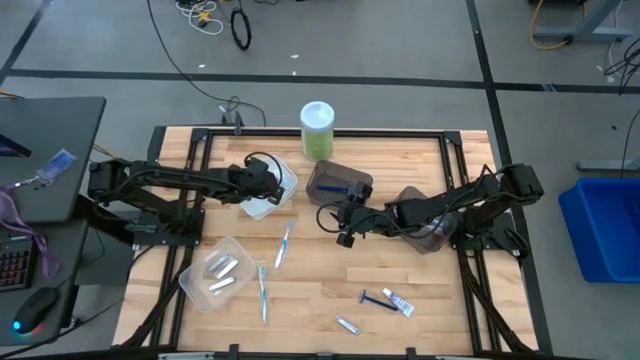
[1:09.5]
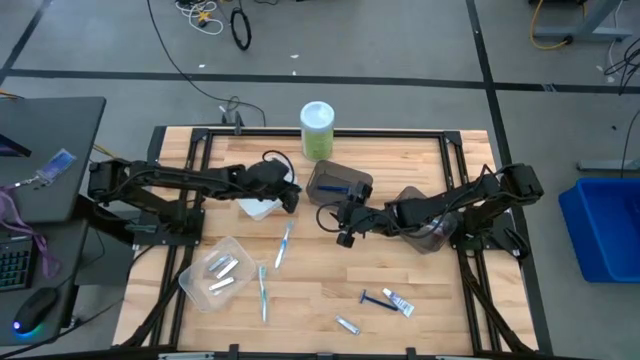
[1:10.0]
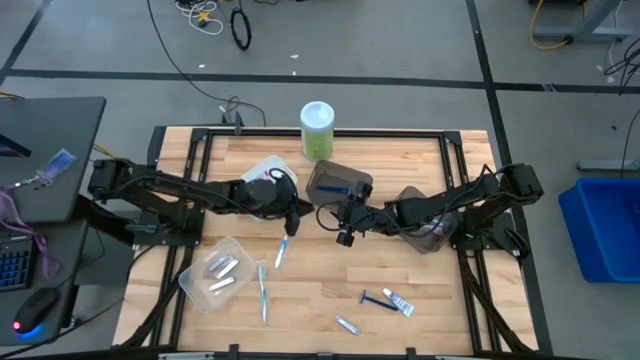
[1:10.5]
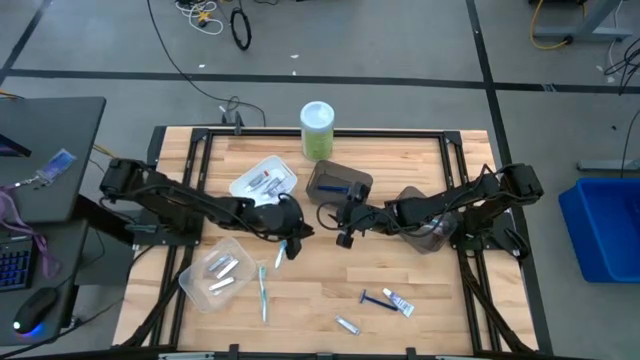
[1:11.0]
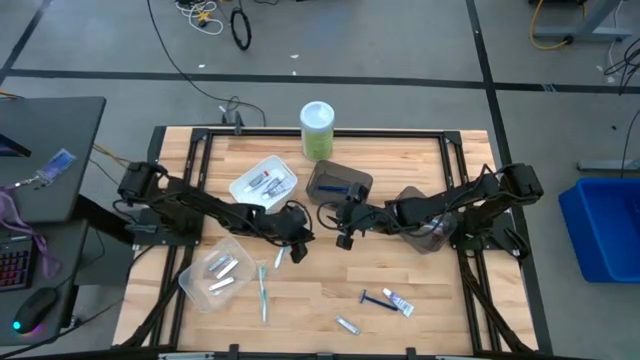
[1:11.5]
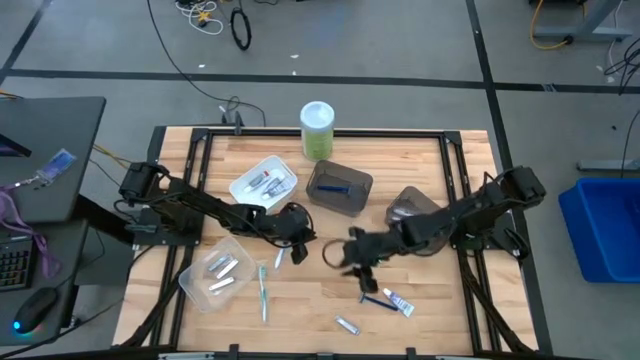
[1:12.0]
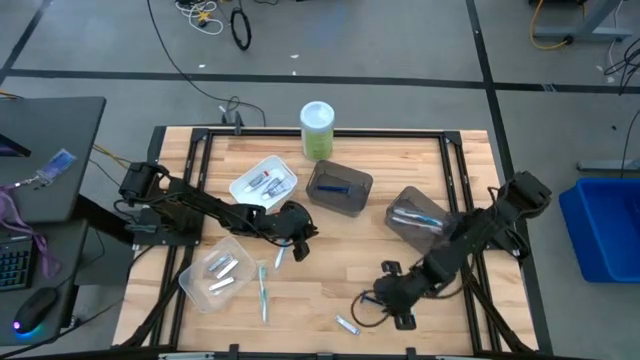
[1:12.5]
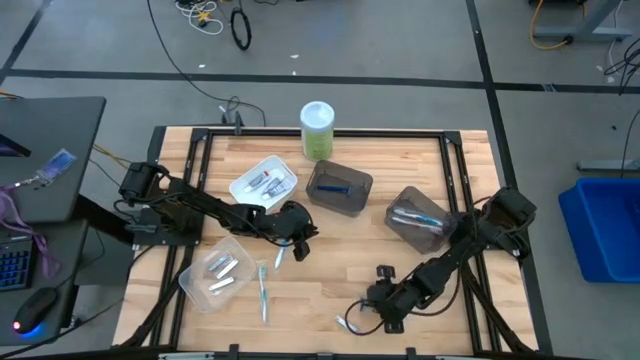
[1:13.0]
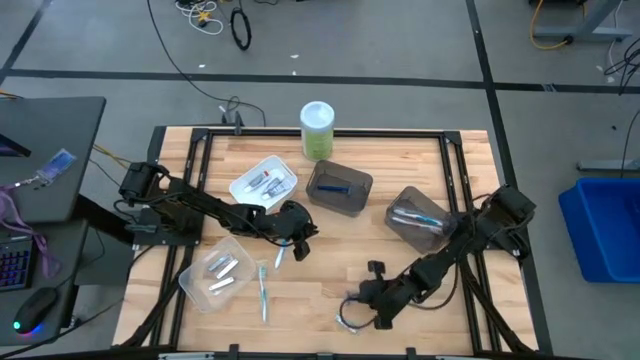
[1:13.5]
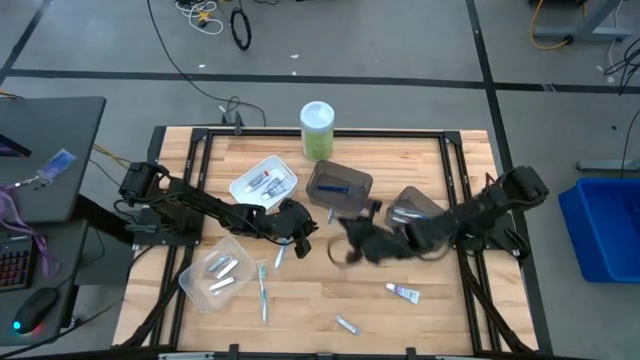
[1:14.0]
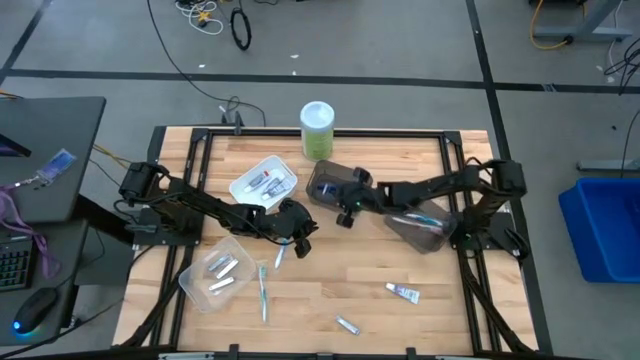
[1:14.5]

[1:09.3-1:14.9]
Task: Pick & Place Travel size toiletries
Put the blue razor into the left black bin

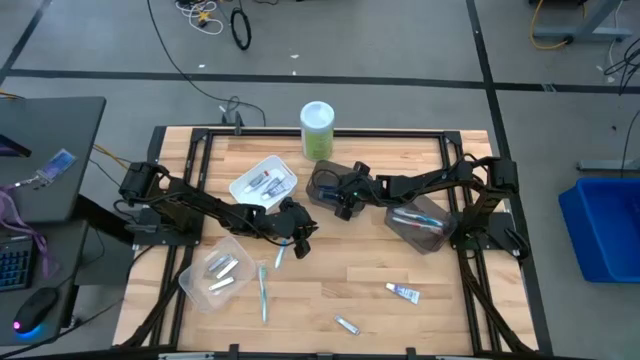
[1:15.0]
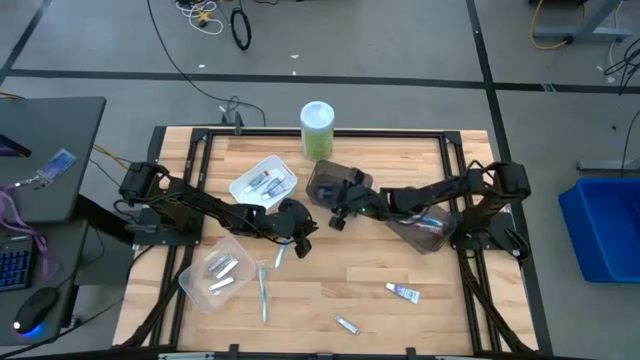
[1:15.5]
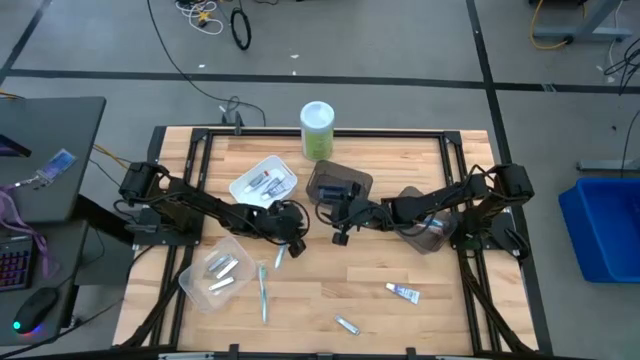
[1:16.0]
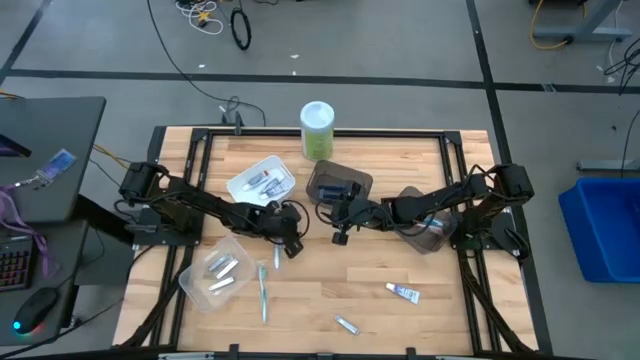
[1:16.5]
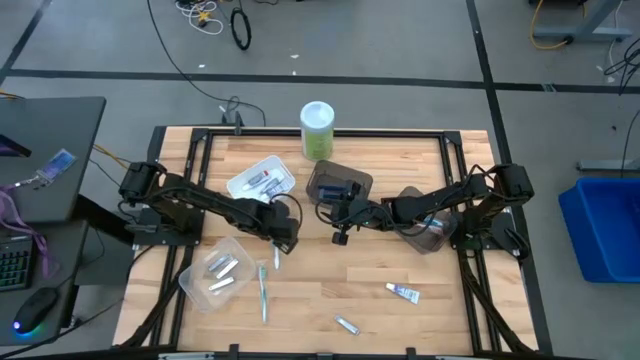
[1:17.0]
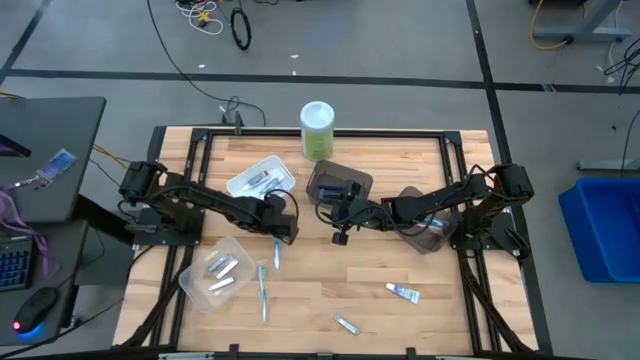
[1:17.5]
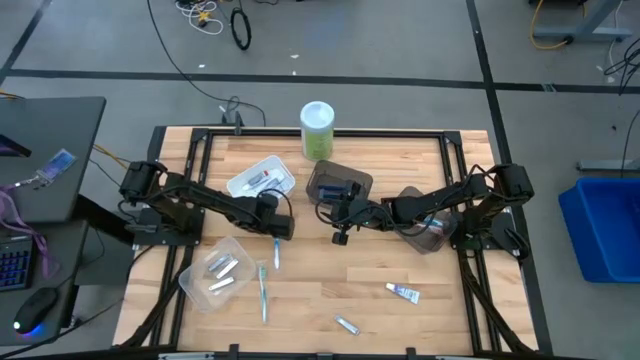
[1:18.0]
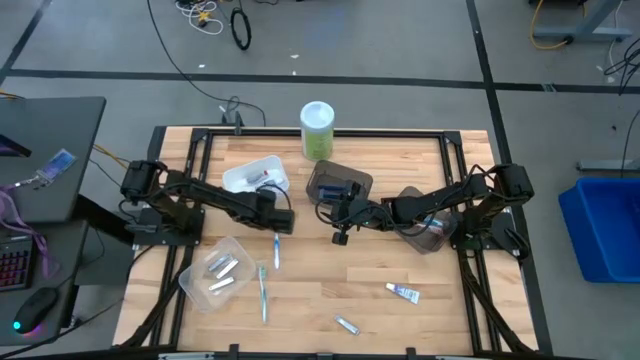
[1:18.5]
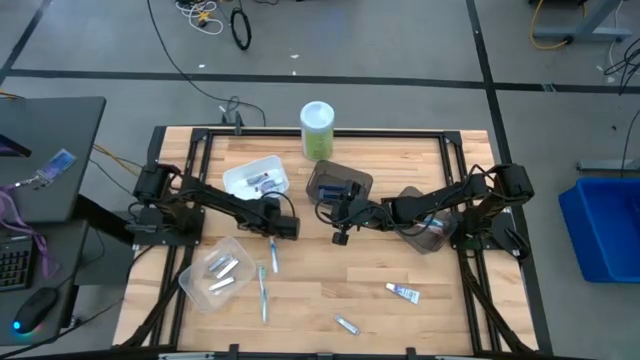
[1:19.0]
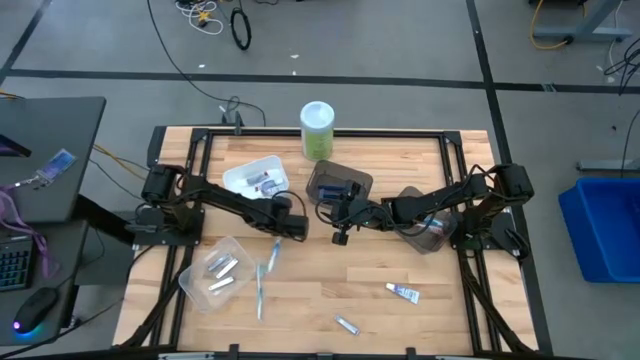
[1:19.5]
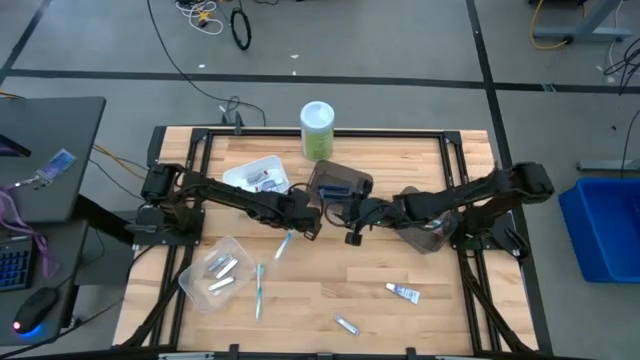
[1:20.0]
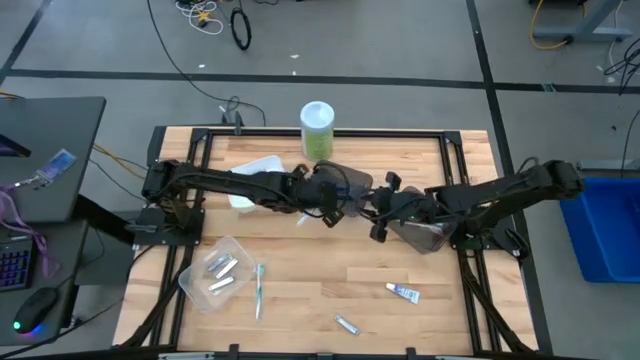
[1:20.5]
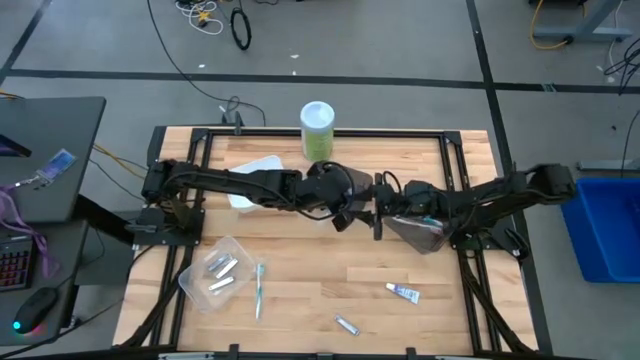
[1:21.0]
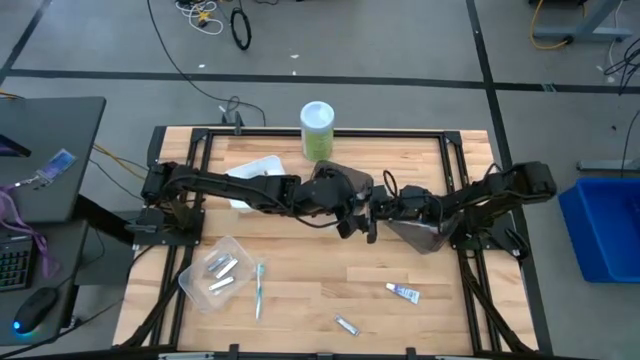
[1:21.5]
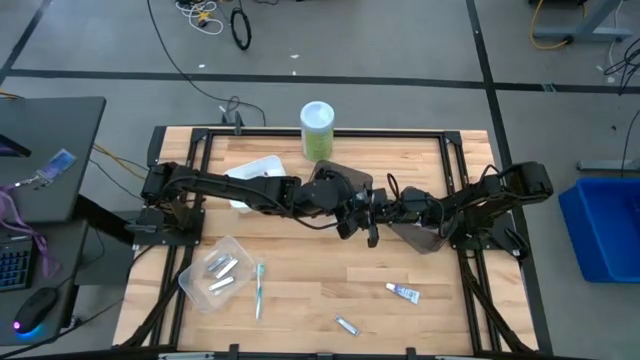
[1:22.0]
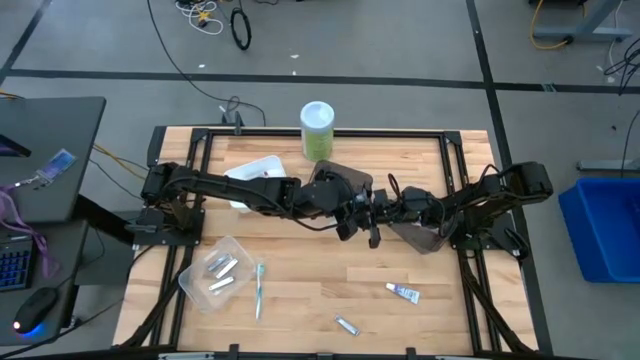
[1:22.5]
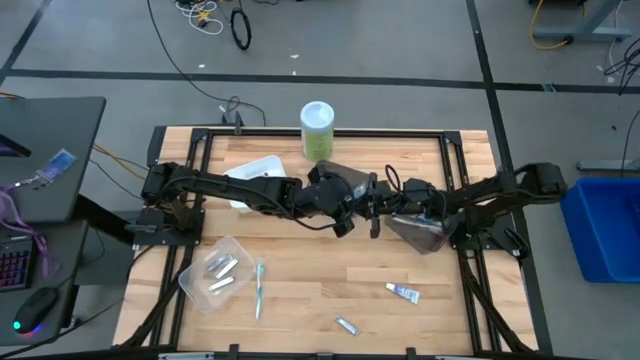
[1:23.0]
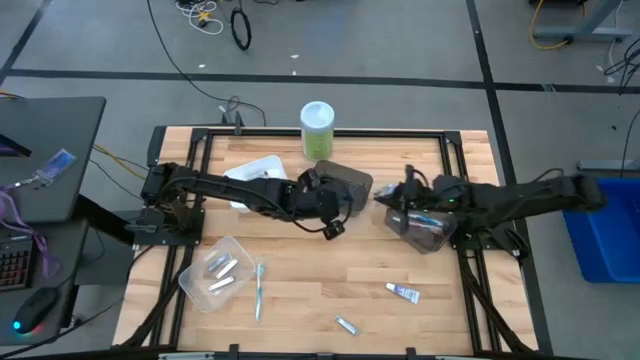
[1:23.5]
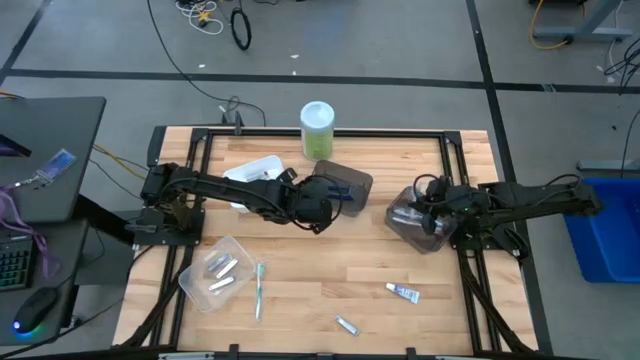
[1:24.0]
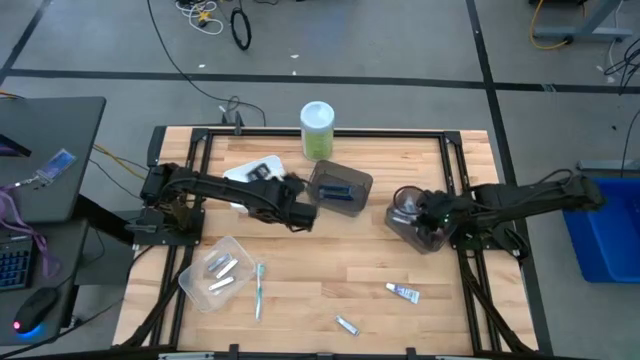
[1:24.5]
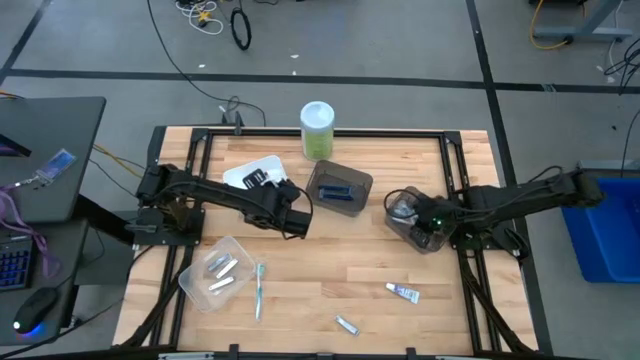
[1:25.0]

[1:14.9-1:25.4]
Put the blue toothbrush into the right black bin

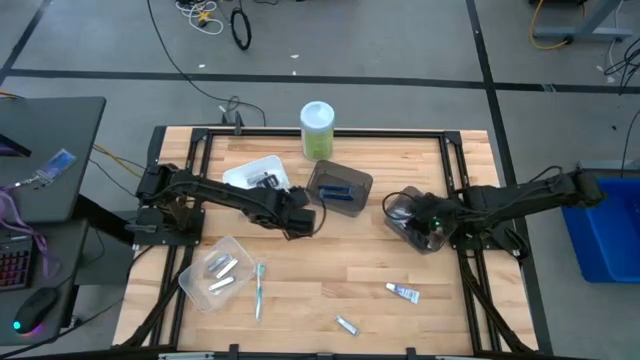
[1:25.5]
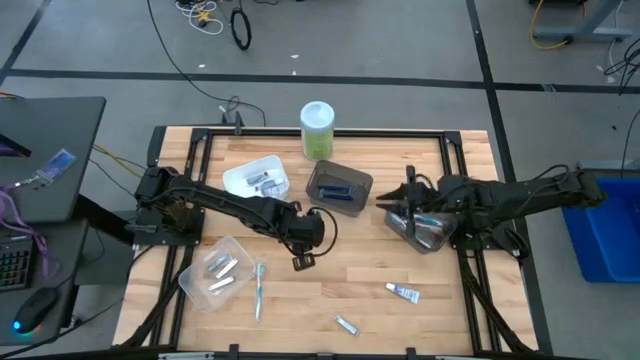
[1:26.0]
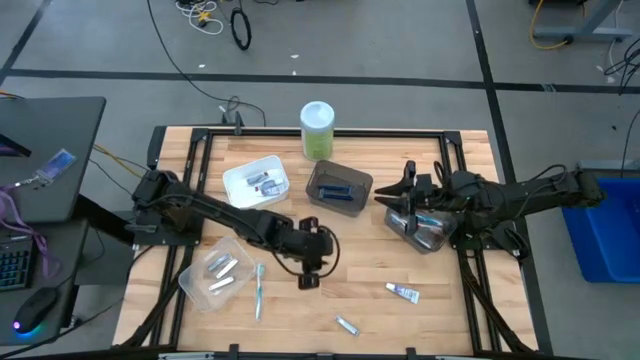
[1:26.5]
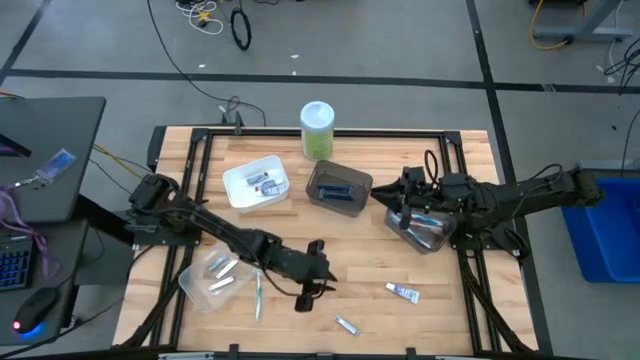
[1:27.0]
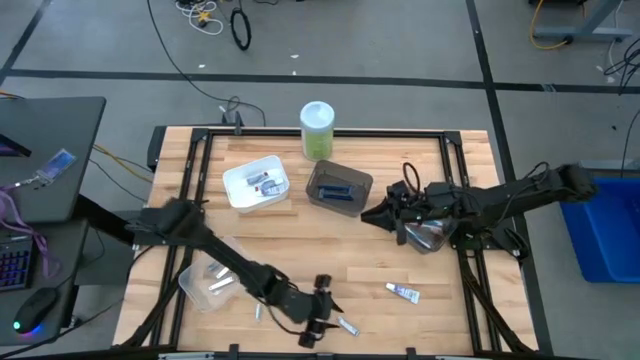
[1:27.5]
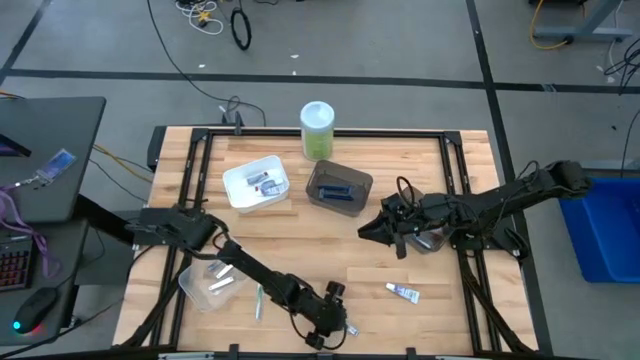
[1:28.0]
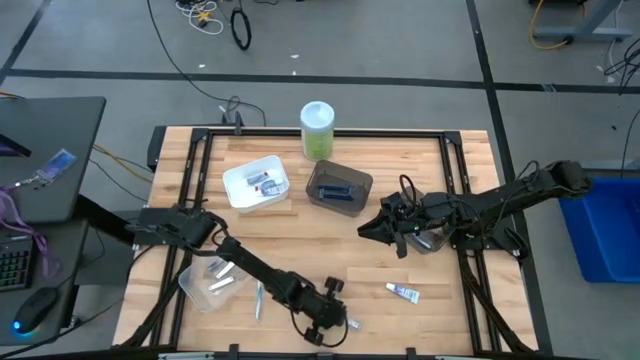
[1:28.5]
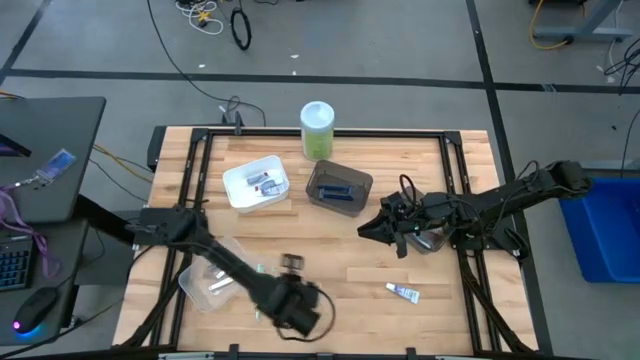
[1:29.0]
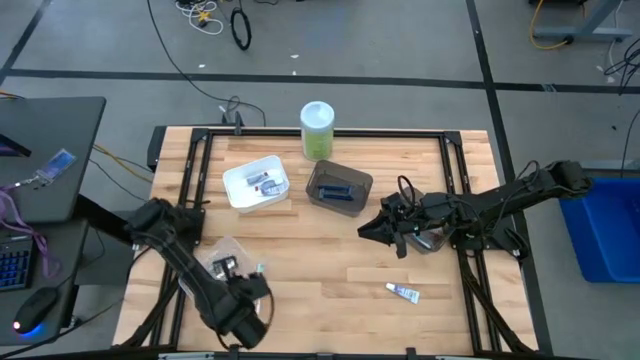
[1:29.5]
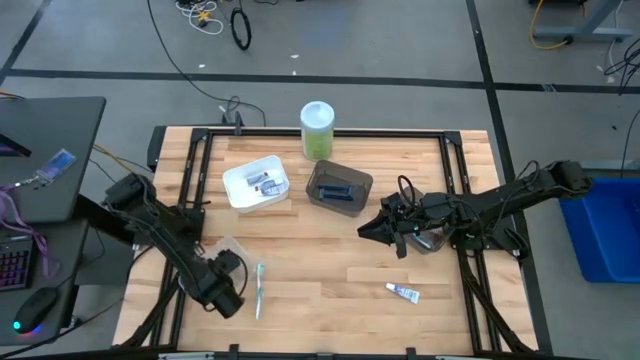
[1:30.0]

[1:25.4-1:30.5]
Put the nail cutter into the transparent bin

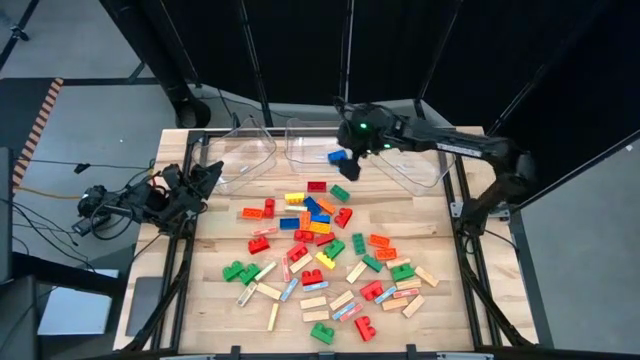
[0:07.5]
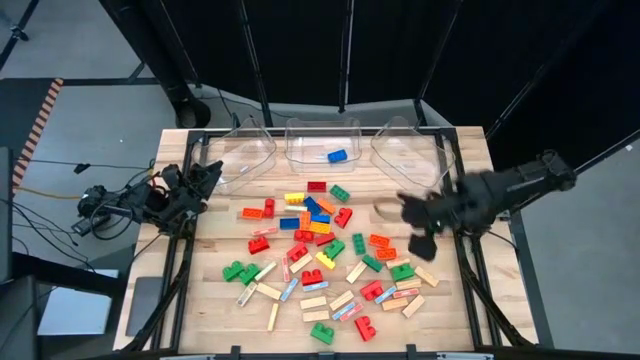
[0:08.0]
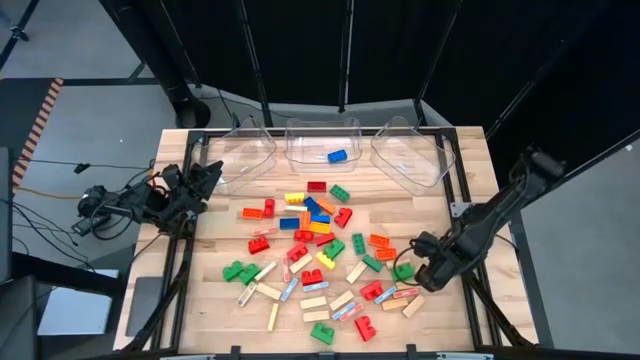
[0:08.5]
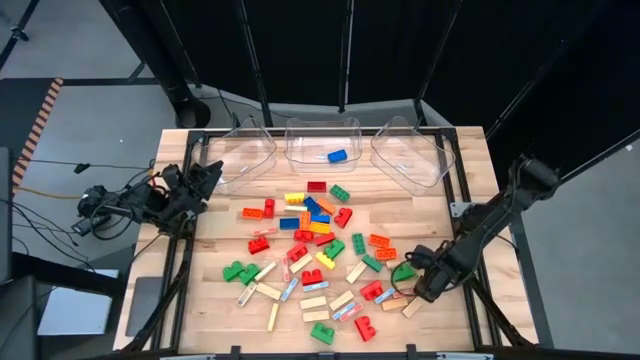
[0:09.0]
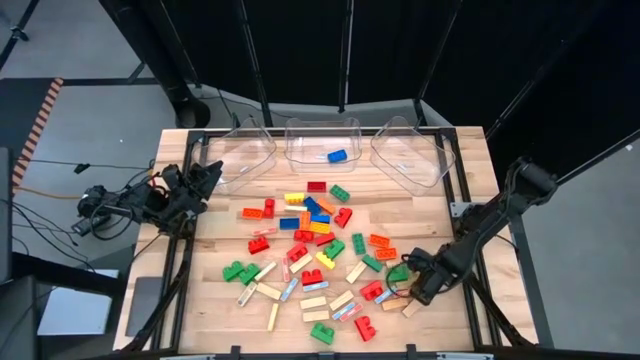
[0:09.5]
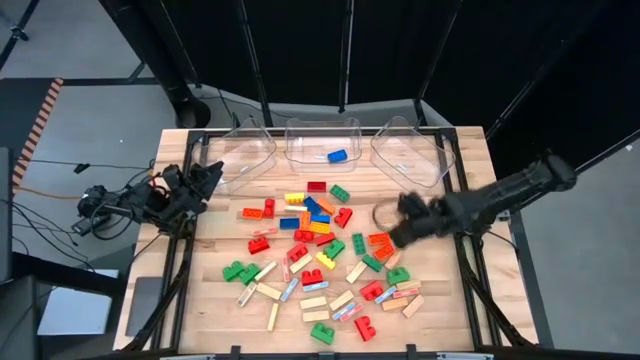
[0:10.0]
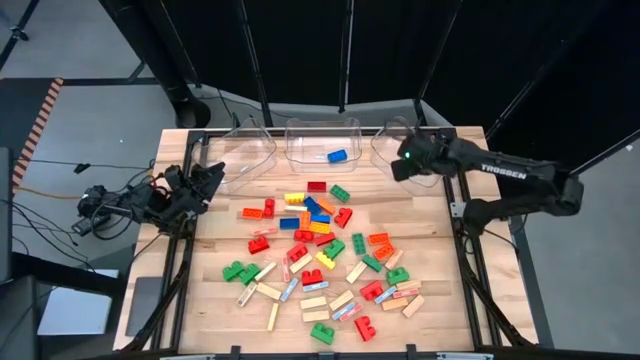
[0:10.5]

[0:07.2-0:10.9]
Task: Sort blocks by size
Put the brown wooden block into the right transparent bin
